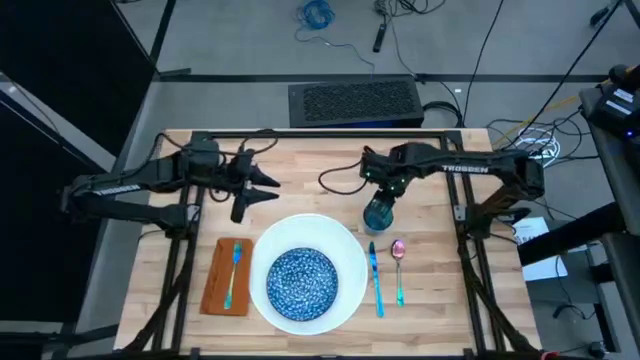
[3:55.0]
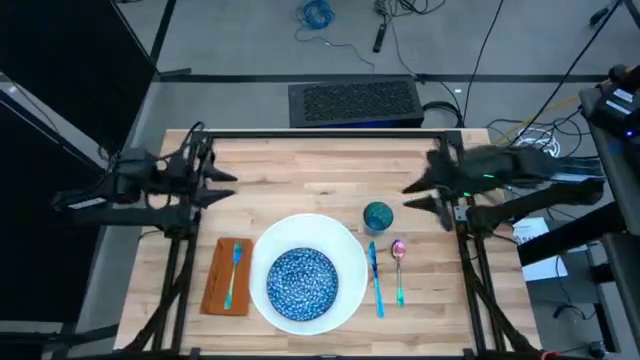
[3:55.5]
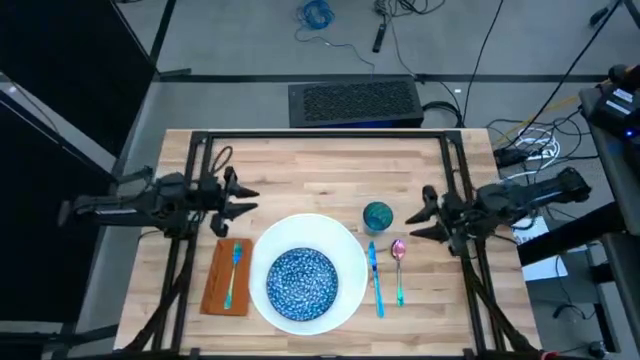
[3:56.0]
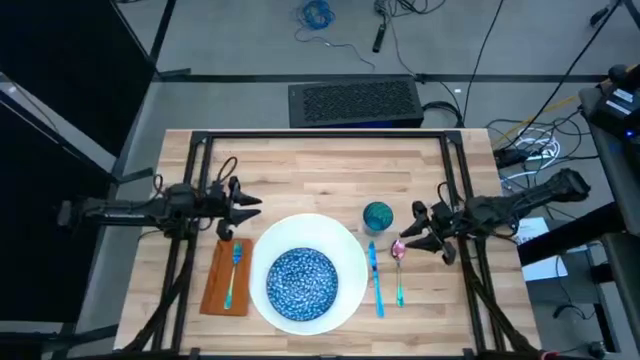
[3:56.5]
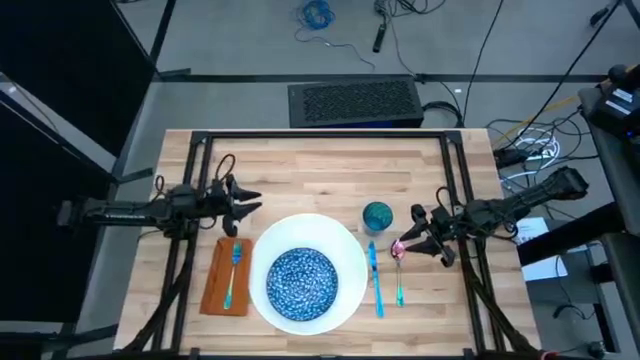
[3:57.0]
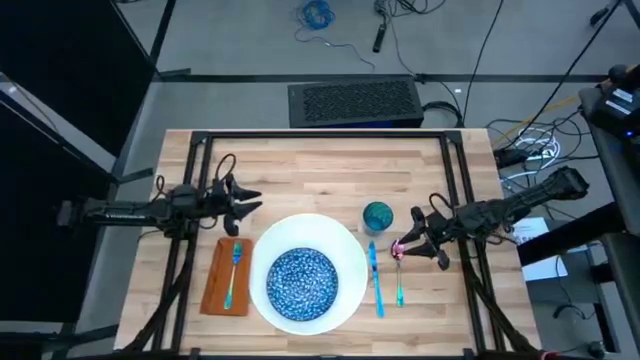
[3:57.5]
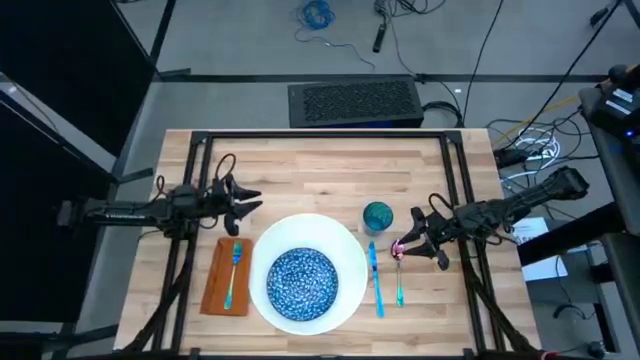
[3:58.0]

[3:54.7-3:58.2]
Task: Set table place
Return to Home Position

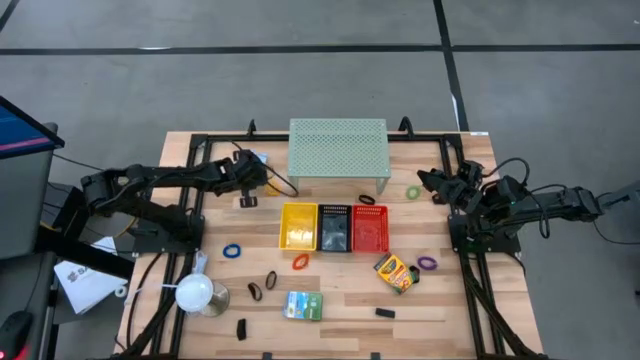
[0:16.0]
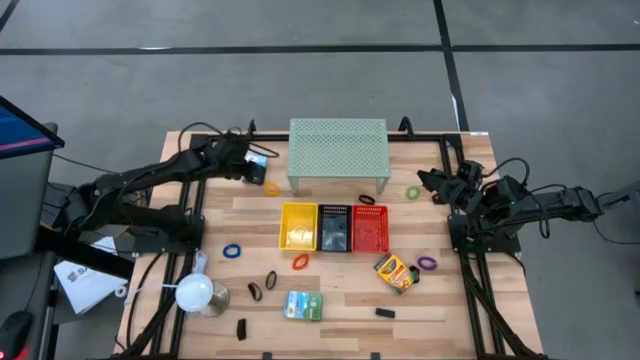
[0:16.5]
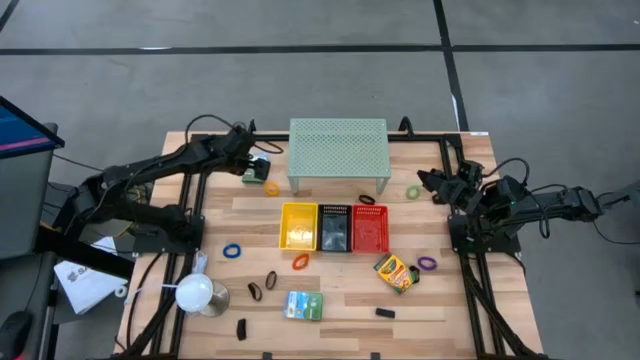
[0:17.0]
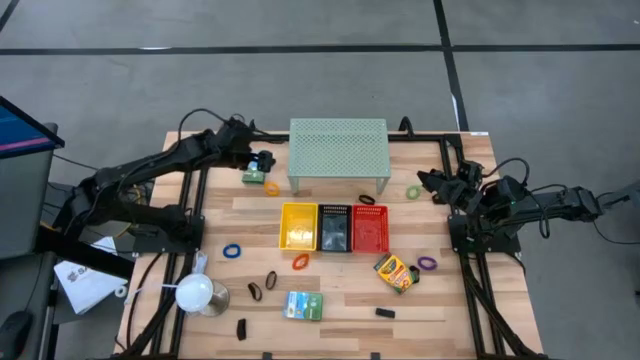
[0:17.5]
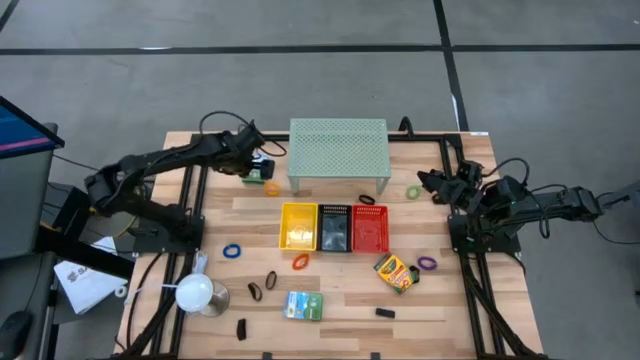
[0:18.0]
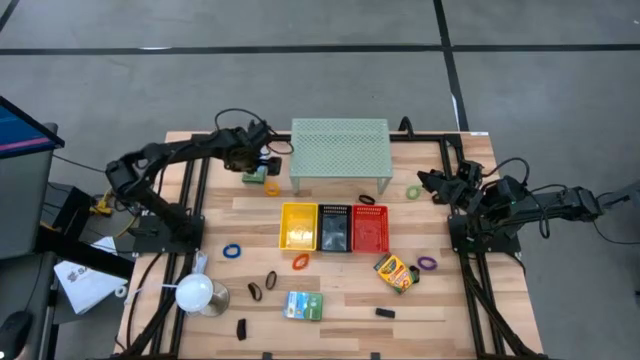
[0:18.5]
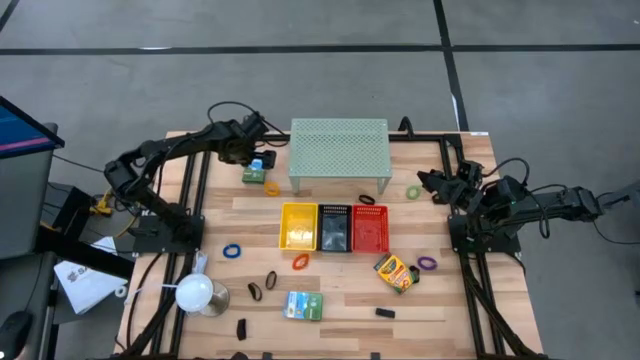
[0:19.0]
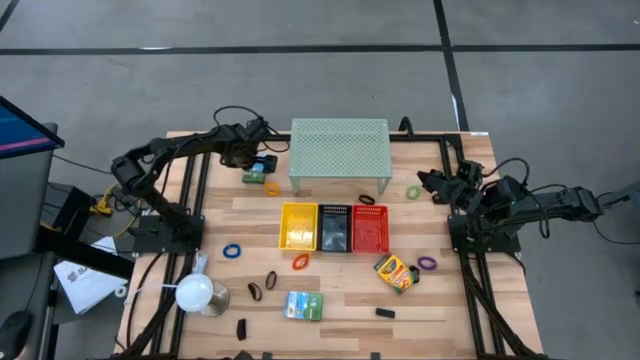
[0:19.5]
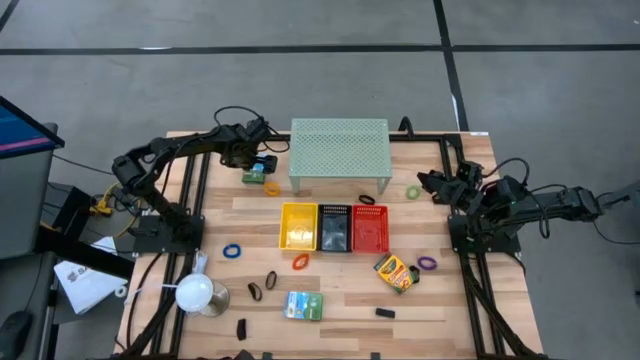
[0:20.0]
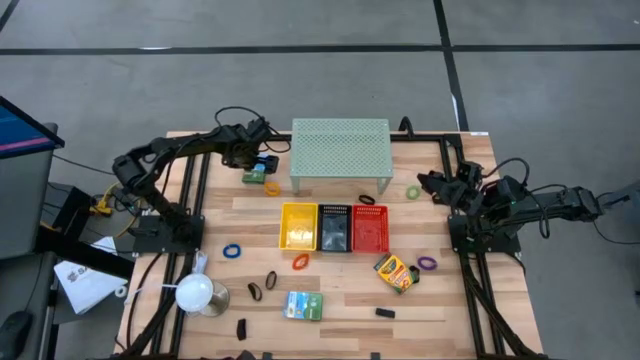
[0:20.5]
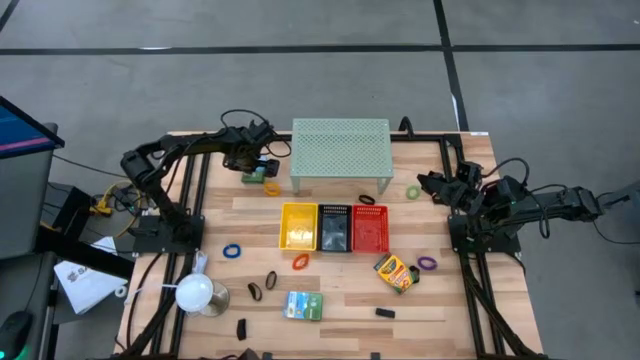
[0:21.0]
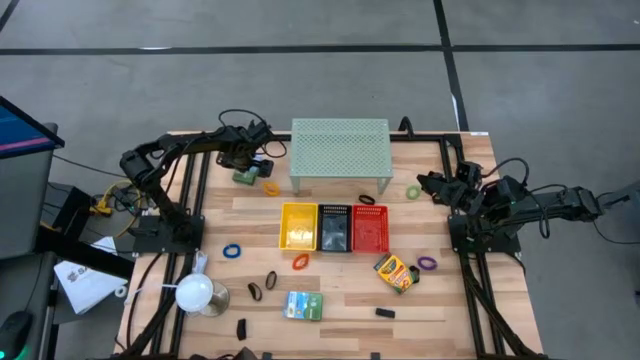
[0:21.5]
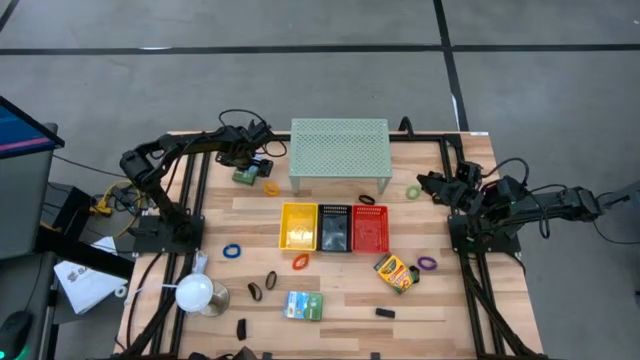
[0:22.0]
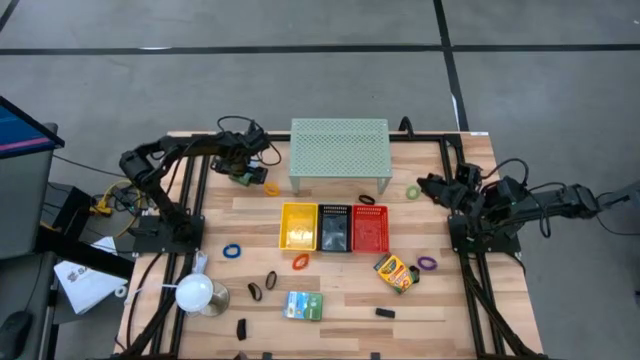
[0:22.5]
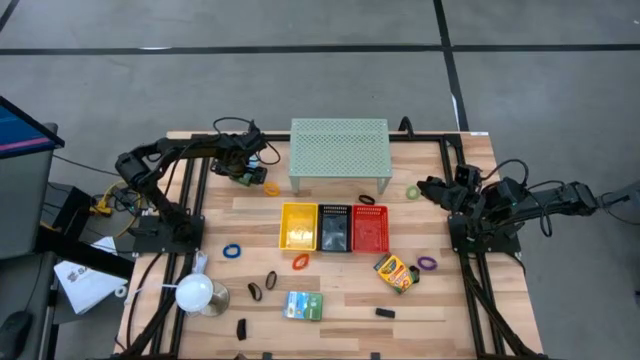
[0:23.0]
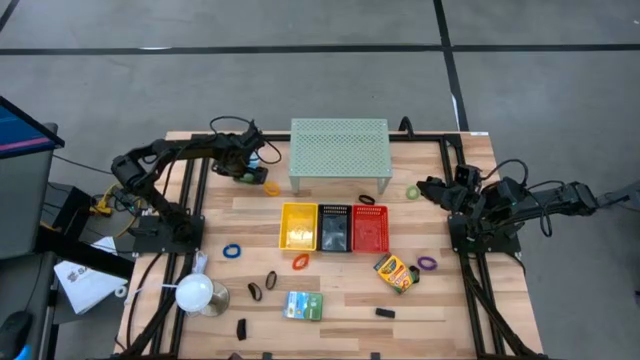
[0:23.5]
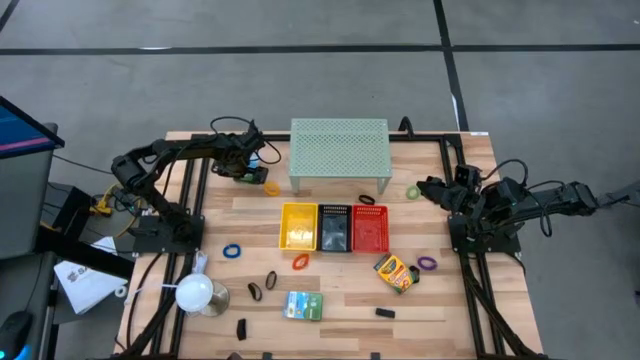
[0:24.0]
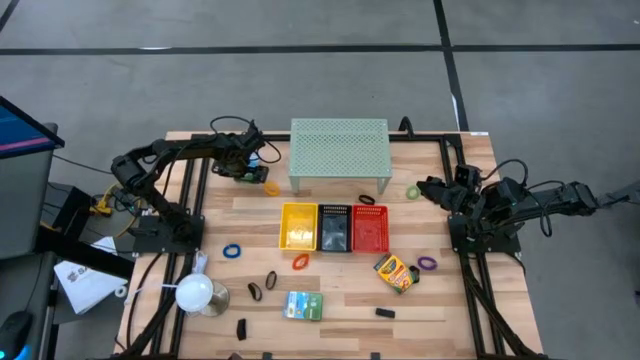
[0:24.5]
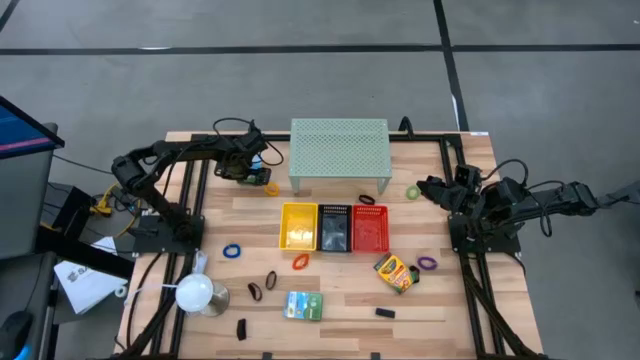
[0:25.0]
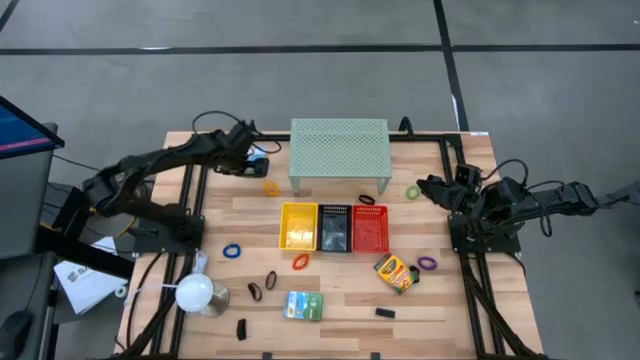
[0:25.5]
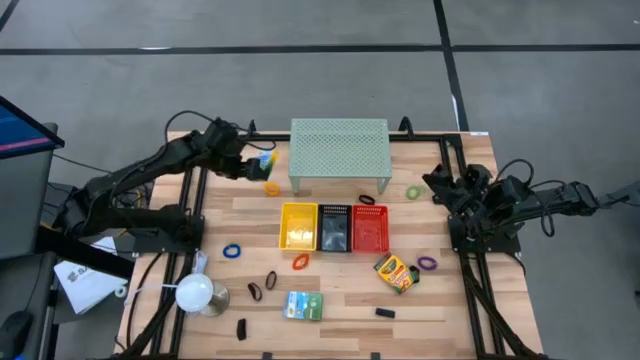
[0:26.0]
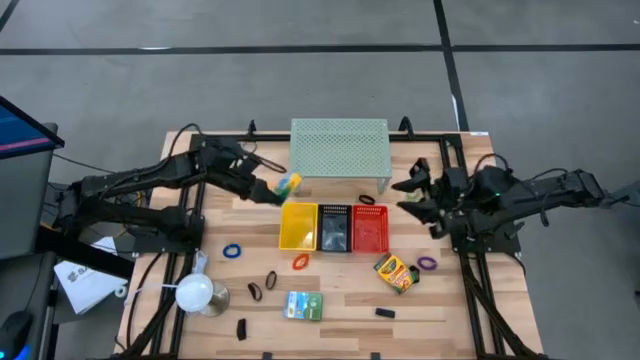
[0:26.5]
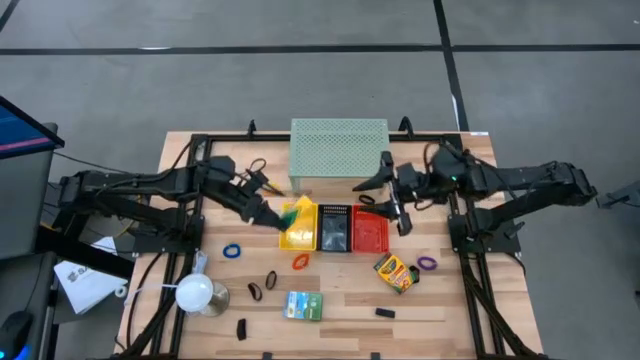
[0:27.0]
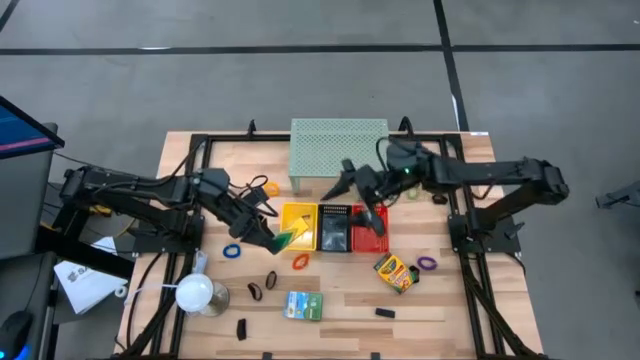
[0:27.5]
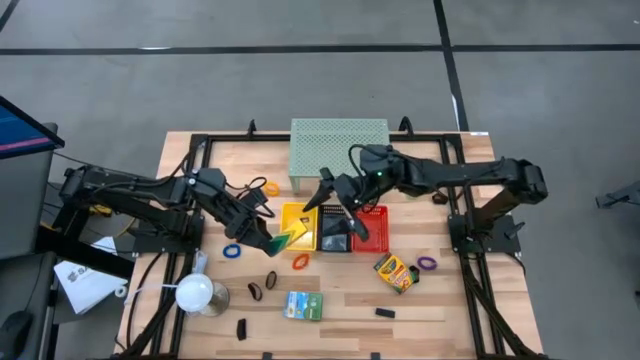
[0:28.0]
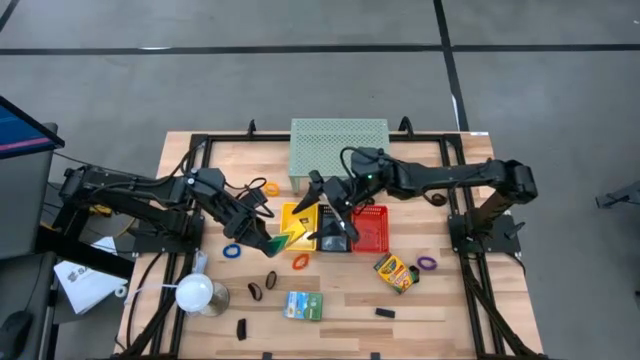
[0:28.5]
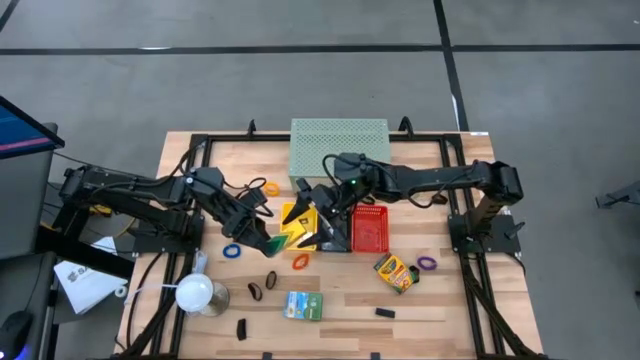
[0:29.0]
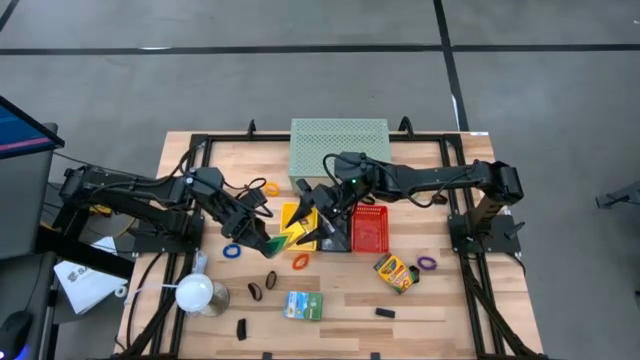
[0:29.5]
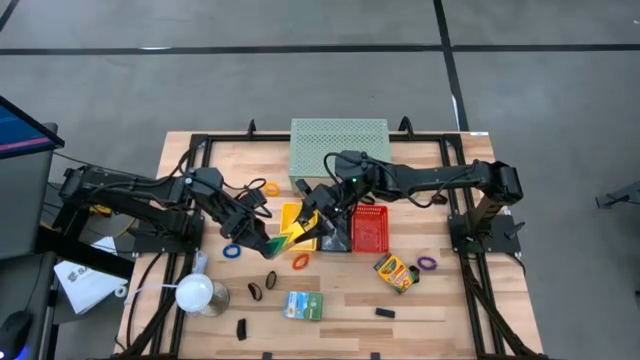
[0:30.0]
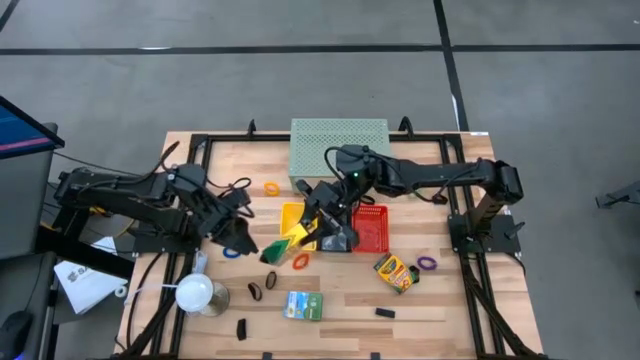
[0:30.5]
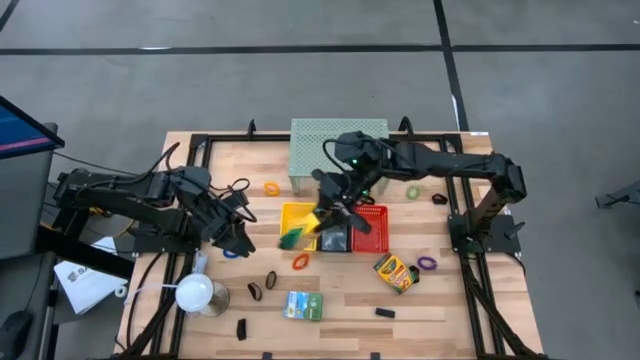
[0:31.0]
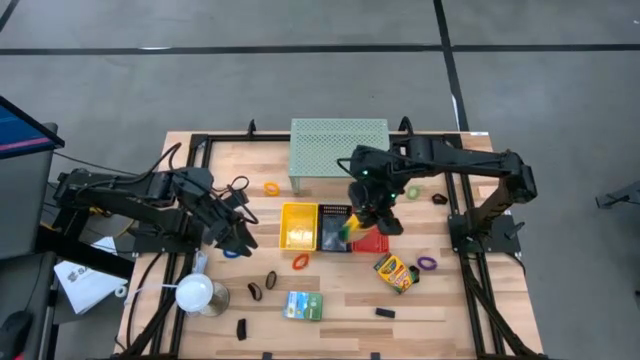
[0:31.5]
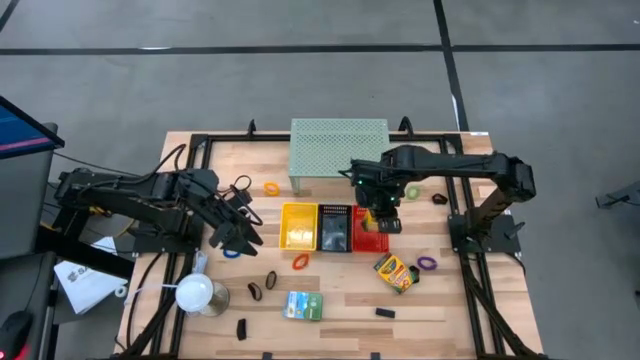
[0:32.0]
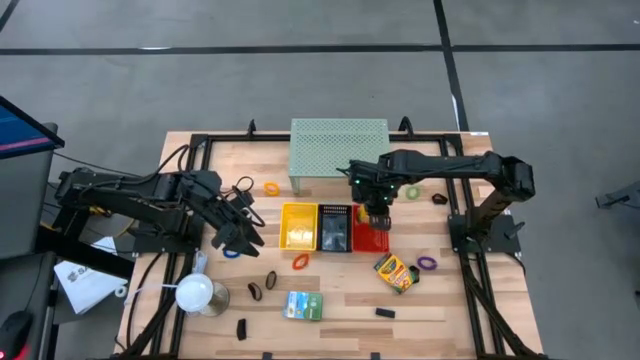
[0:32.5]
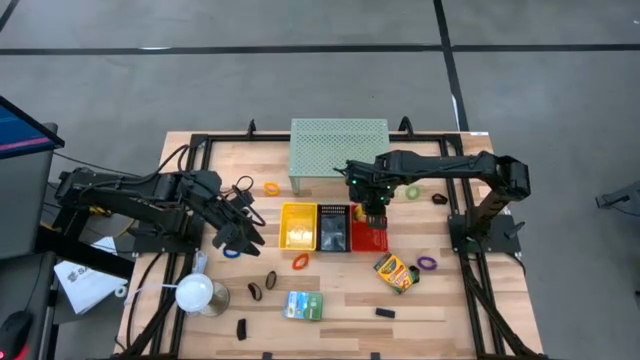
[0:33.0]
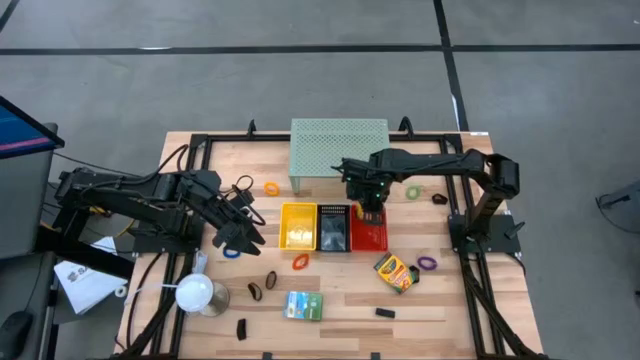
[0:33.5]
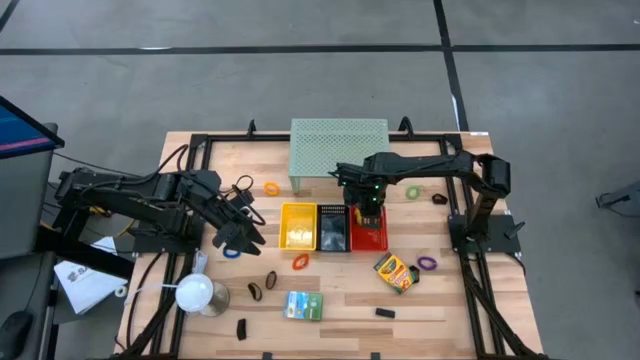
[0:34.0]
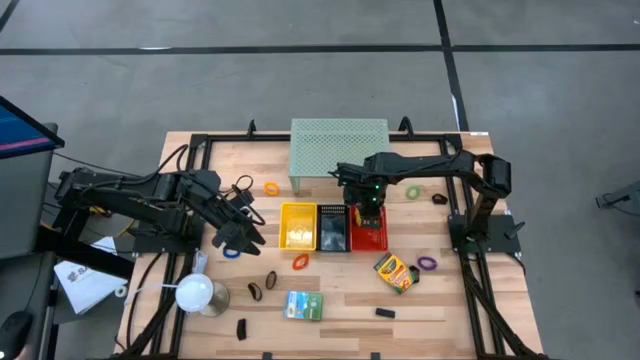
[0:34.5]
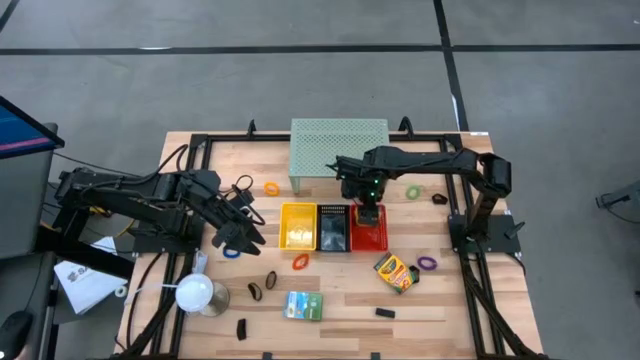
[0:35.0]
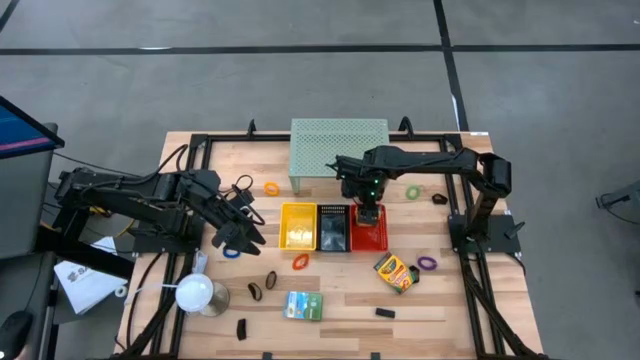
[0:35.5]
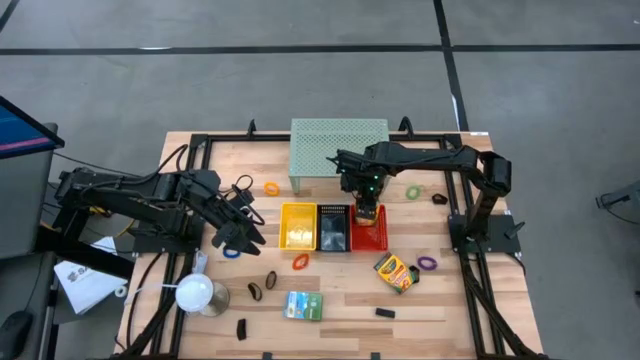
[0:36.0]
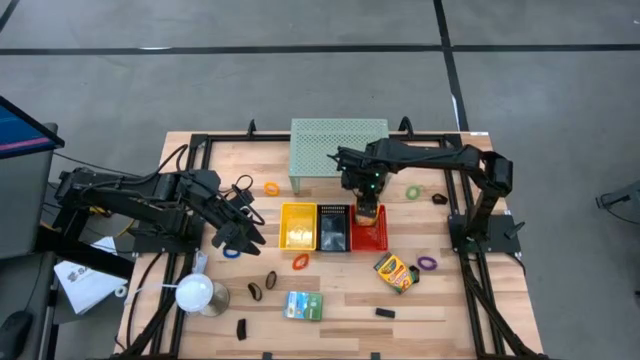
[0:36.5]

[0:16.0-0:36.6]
Task: Pick & Place Office Desk Supplies
Put the crayons box into the red bin
